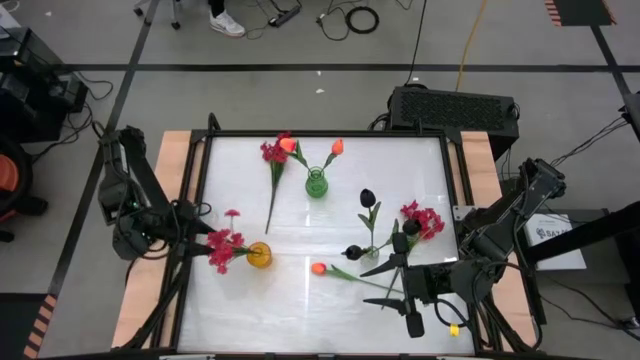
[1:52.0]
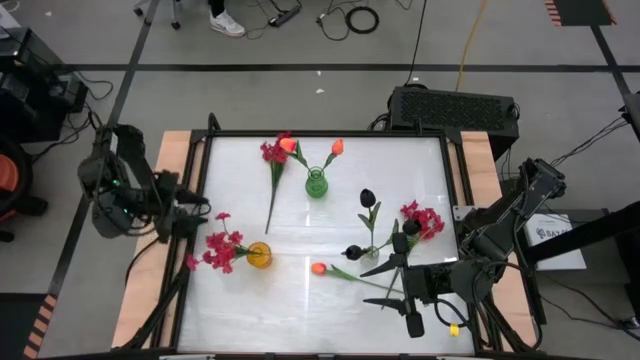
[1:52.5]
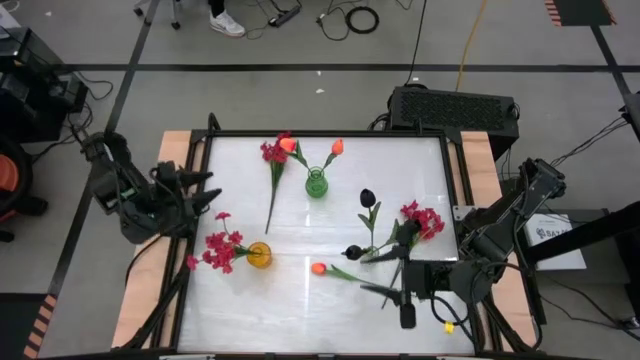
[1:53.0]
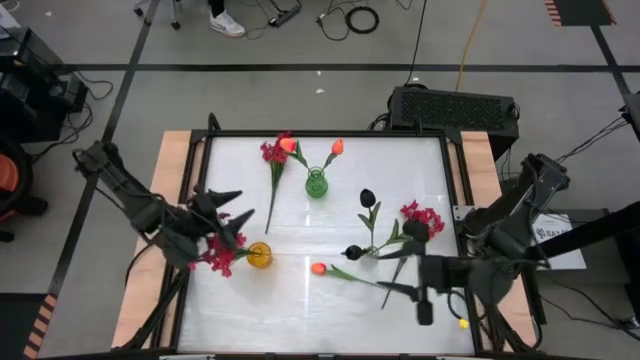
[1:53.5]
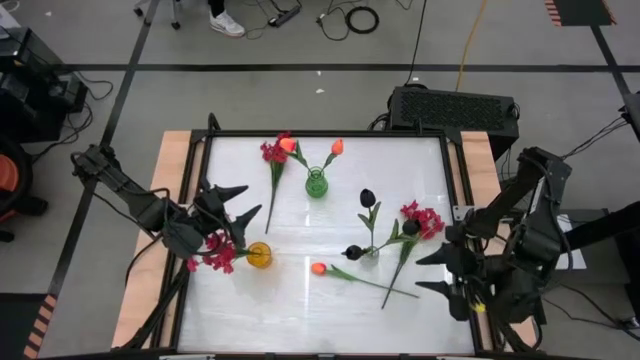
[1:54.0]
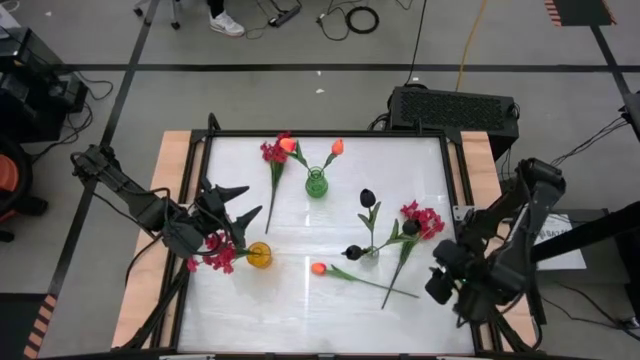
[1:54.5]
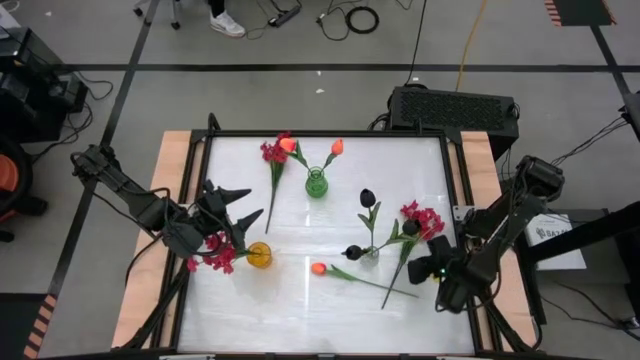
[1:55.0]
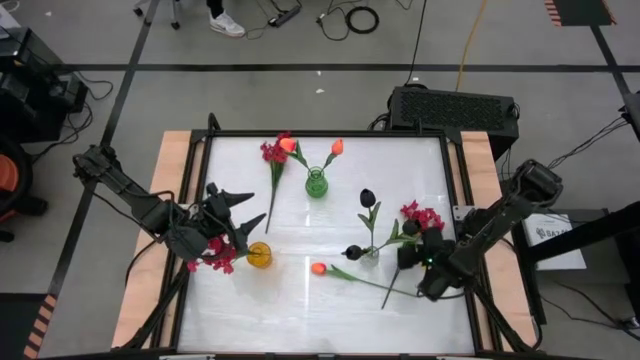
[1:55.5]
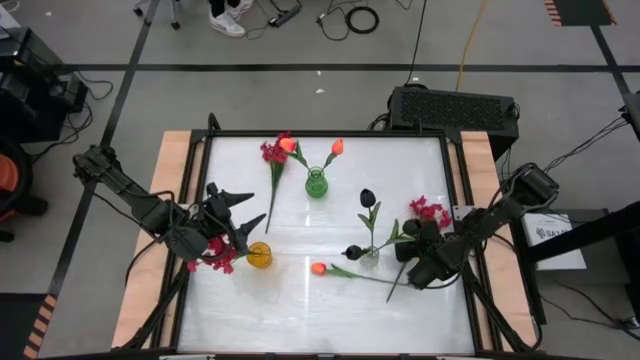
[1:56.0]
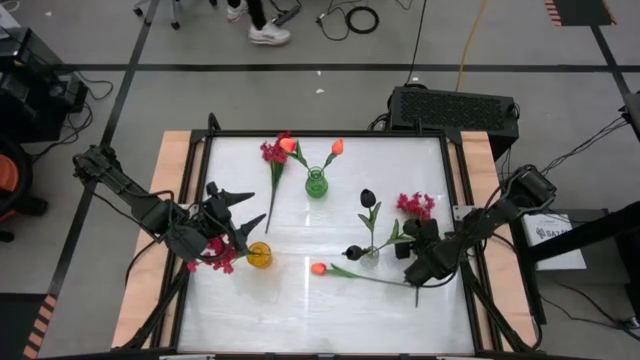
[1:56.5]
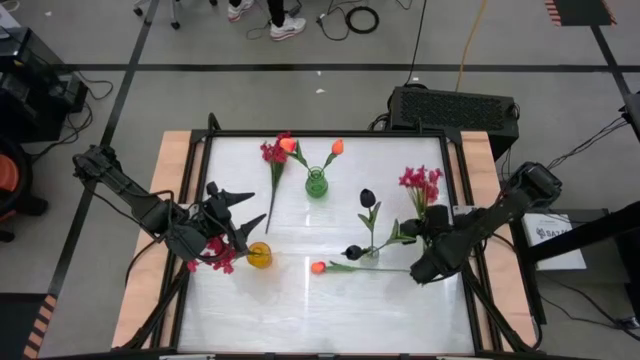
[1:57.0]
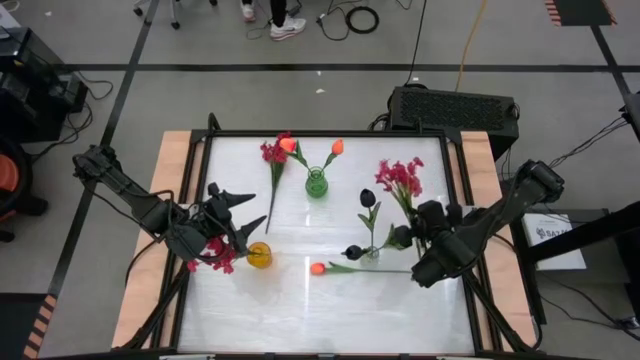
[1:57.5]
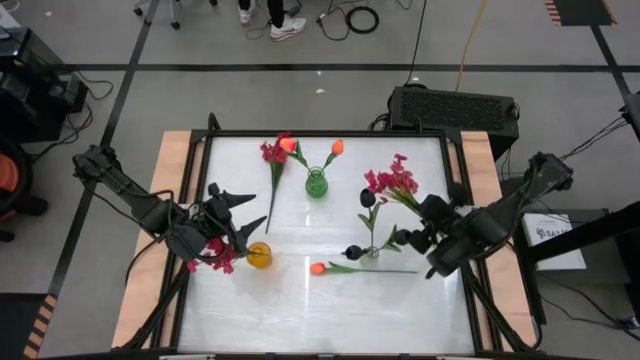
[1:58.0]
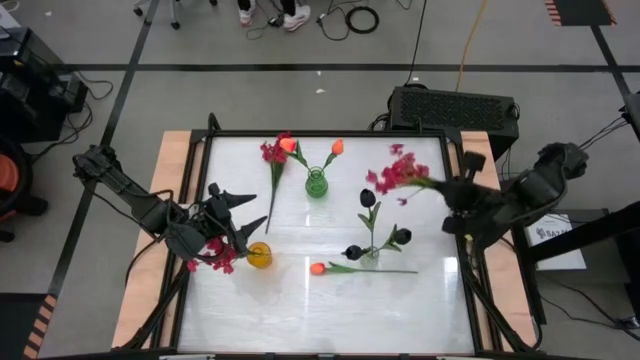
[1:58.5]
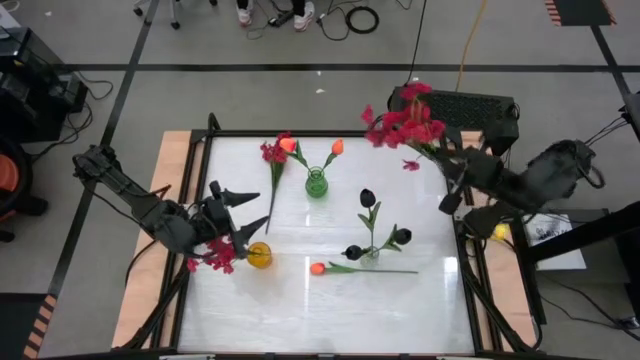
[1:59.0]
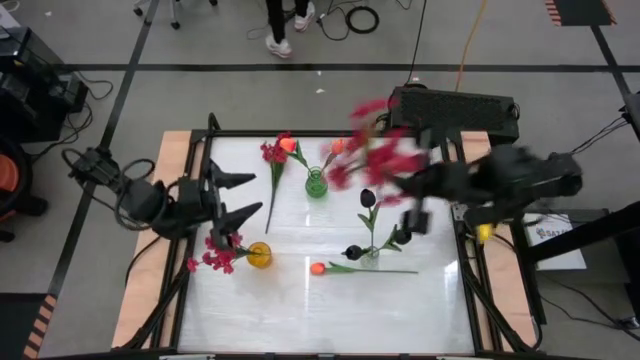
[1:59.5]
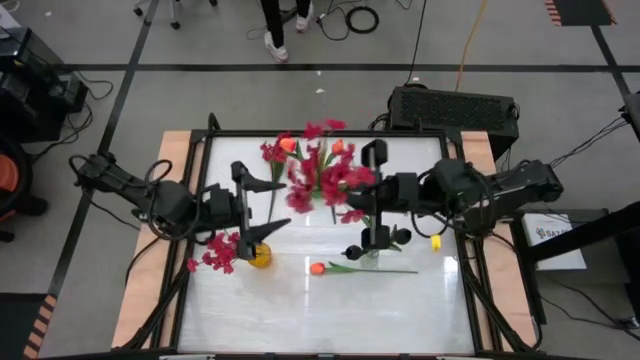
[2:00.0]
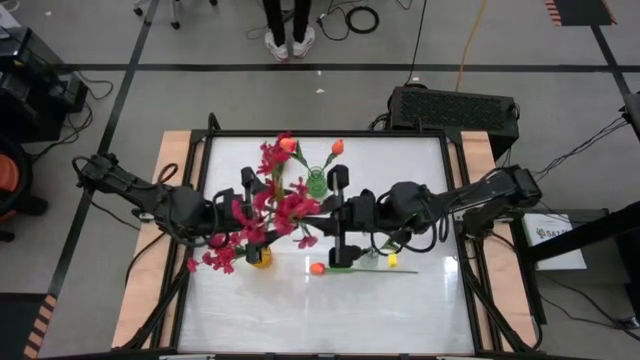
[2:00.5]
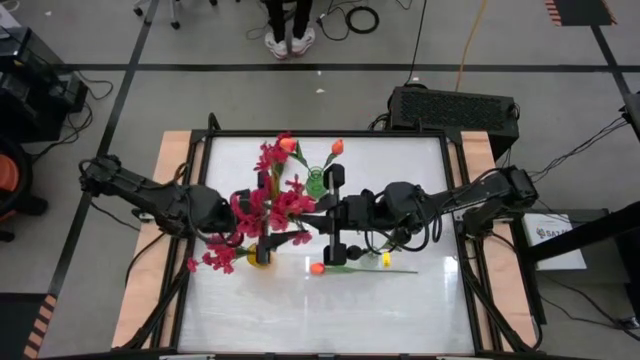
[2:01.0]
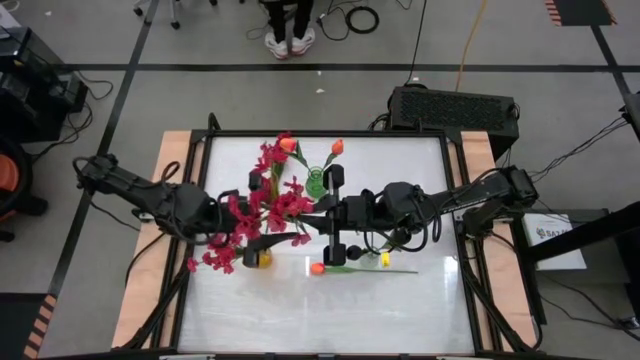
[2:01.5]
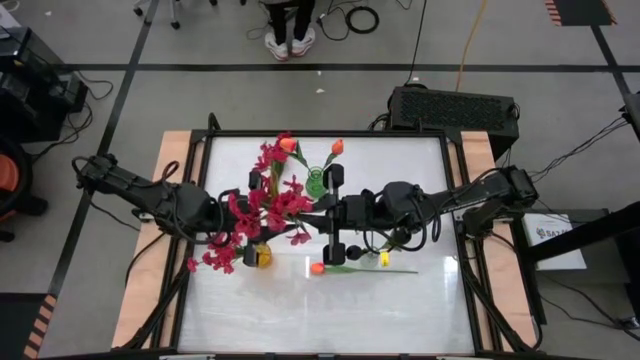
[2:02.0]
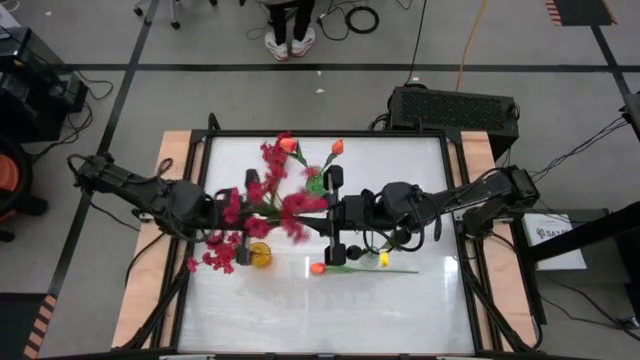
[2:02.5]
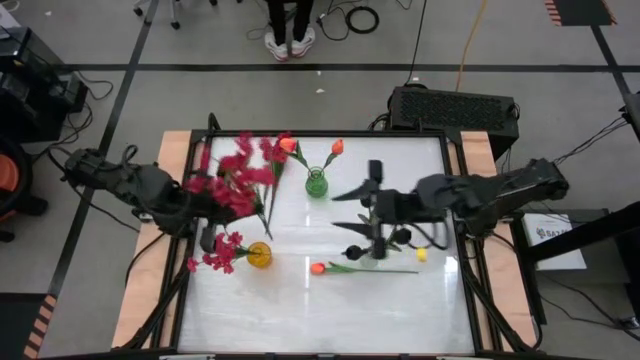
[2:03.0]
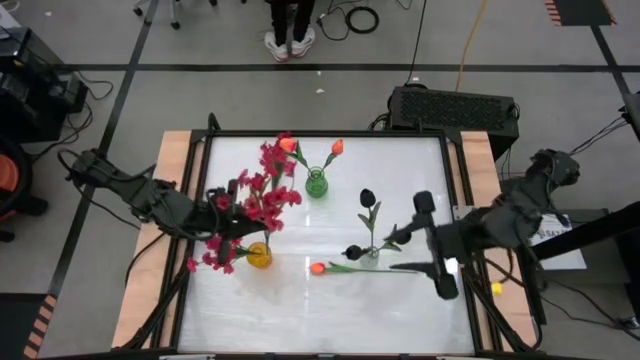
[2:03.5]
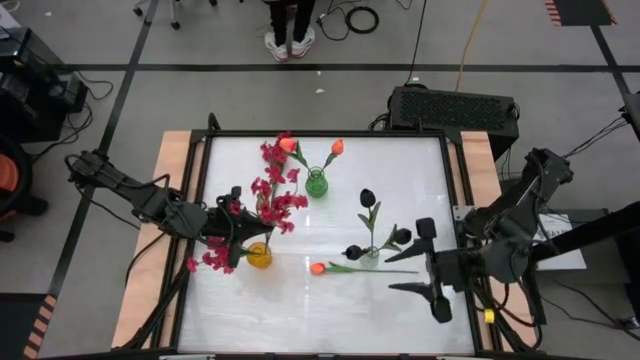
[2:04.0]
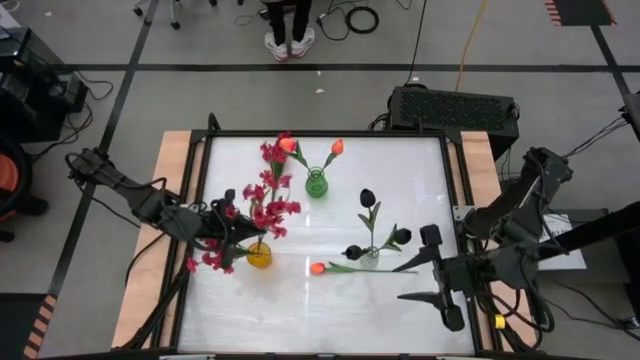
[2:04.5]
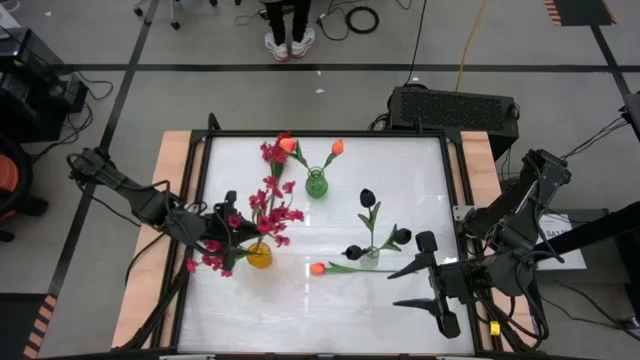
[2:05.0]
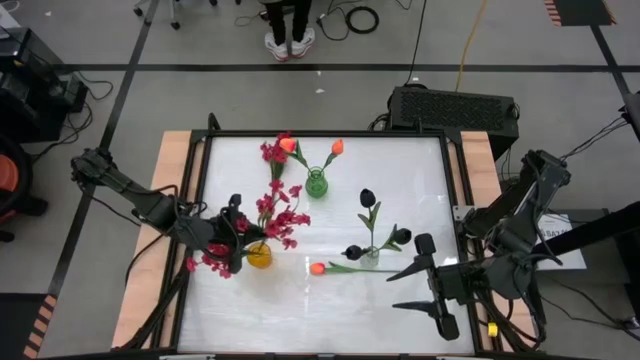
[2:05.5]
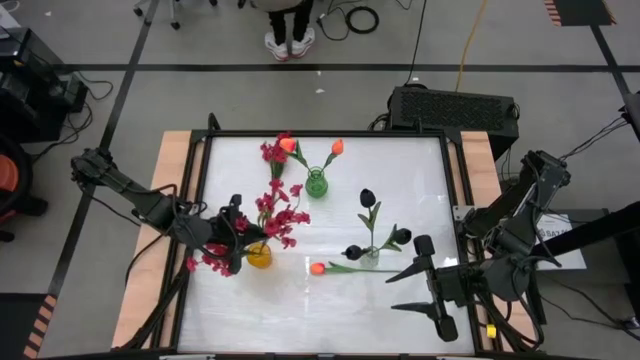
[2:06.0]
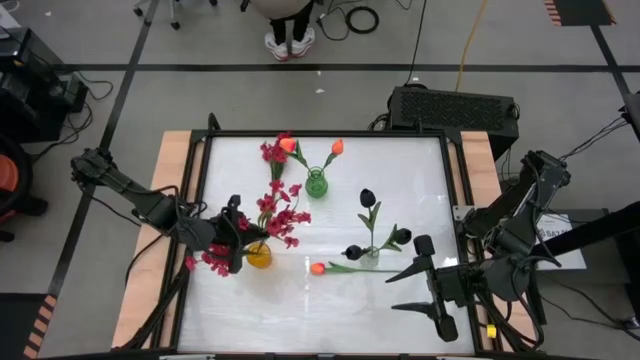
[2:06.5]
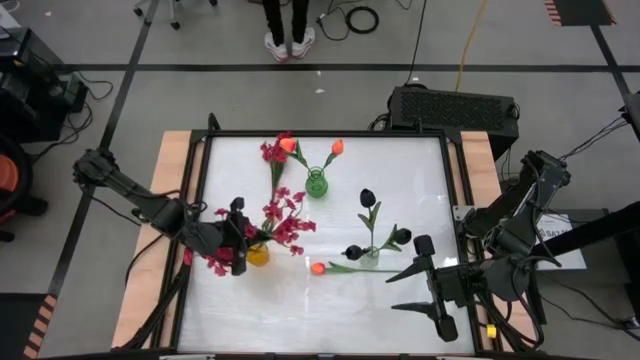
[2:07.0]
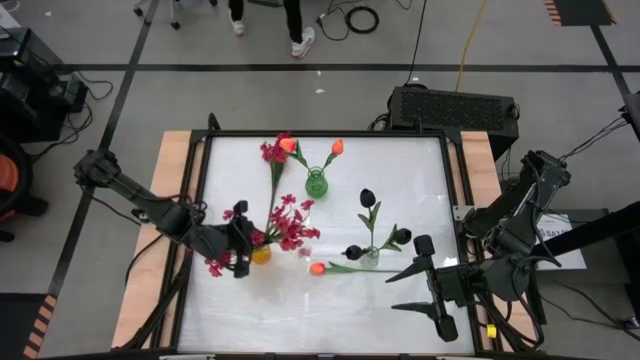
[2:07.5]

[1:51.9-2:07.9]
Task: Sort flowers into vase by color
Put the right red flowers into the yellow vase

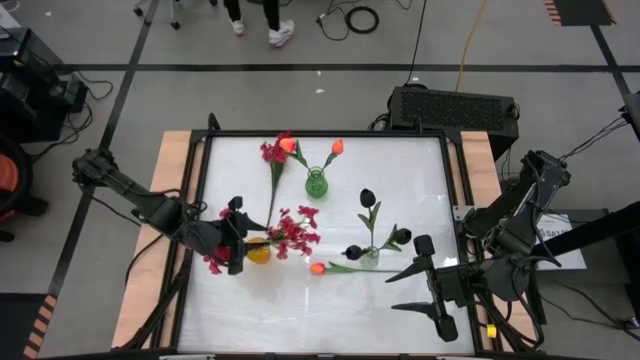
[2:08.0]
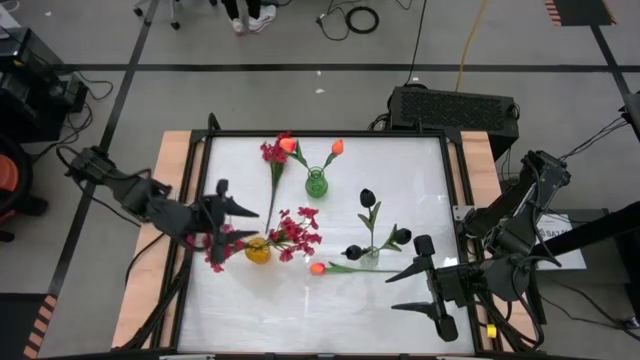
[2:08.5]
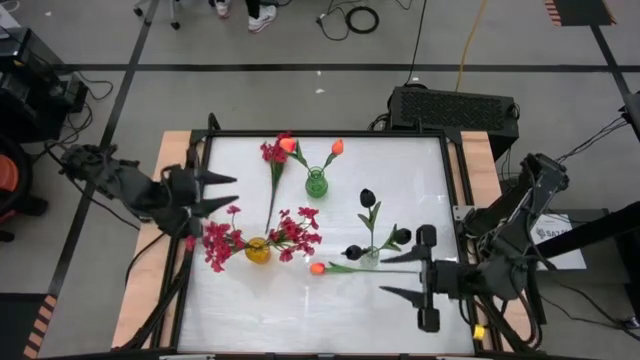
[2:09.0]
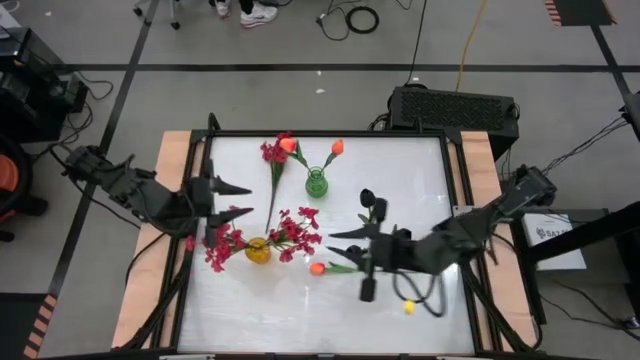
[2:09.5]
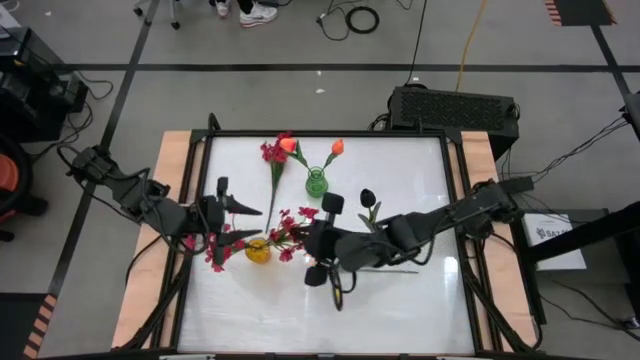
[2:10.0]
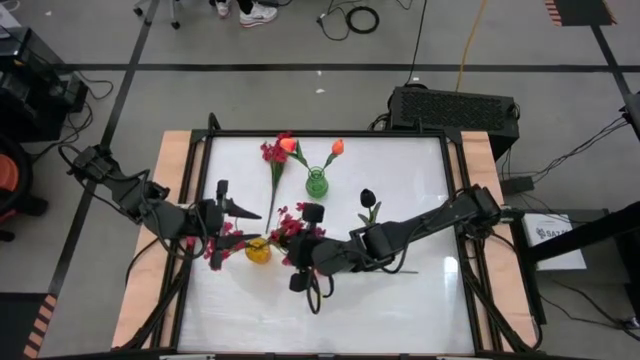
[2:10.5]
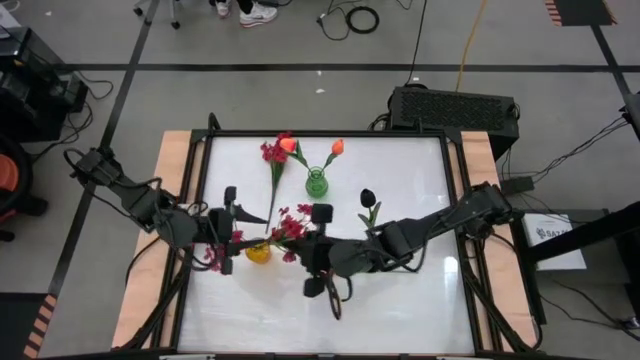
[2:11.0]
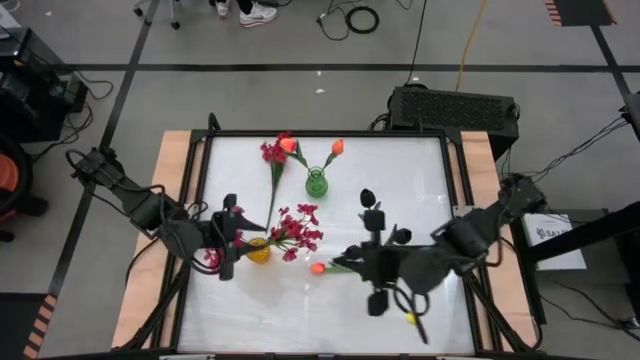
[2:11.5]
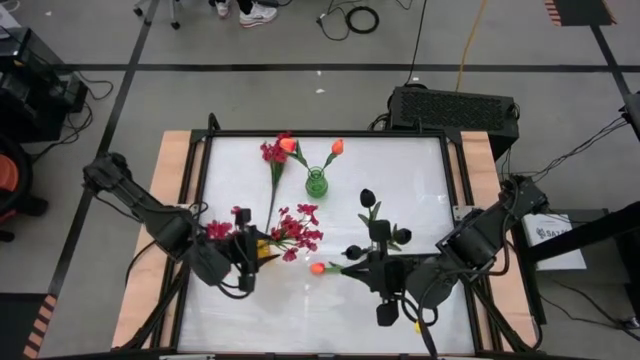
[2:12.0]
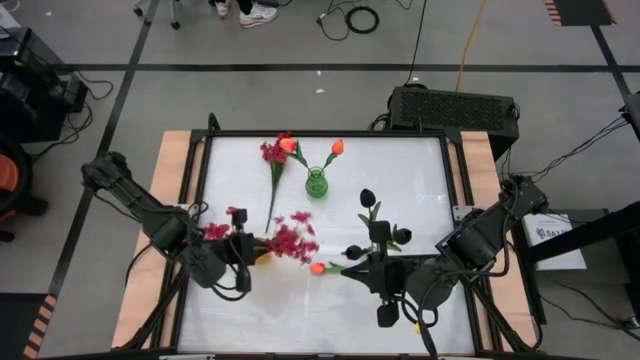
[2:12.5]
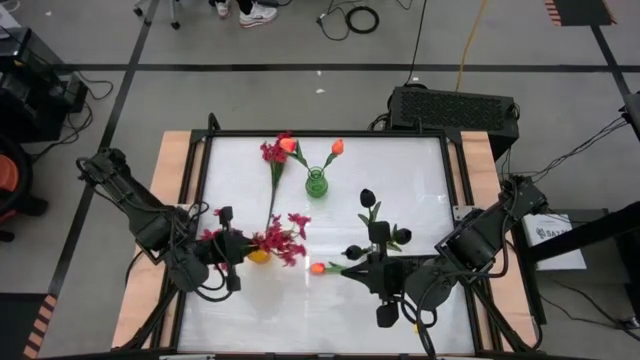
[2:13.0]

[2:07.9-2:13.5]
Adjust the red flowers in the yellow vase
